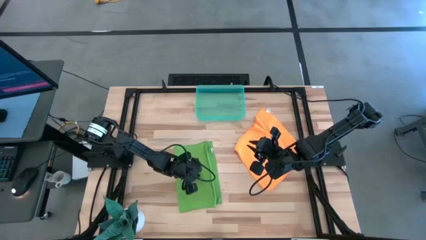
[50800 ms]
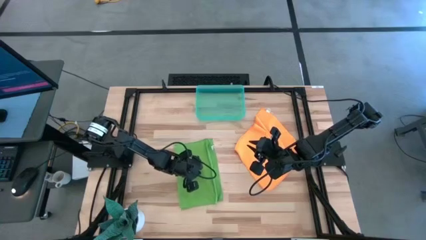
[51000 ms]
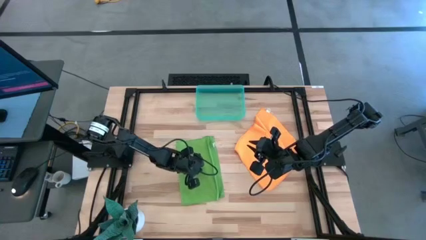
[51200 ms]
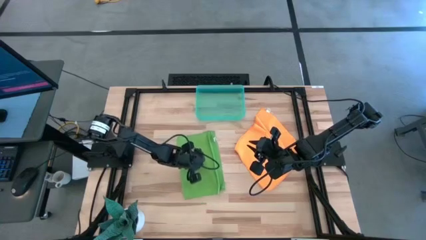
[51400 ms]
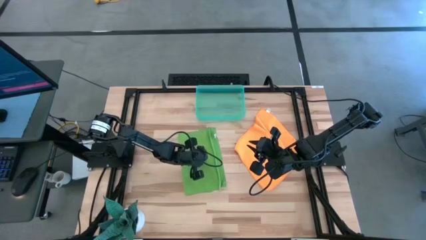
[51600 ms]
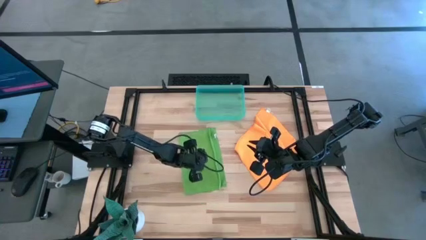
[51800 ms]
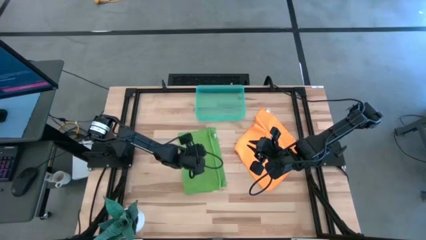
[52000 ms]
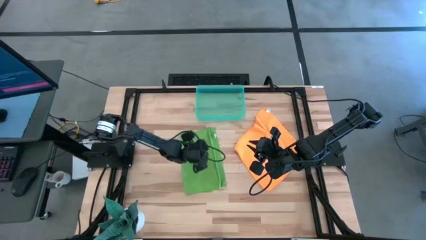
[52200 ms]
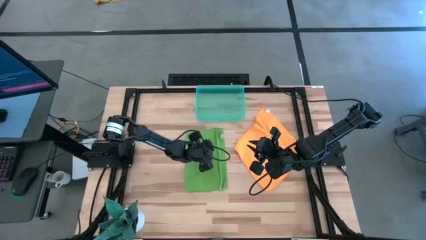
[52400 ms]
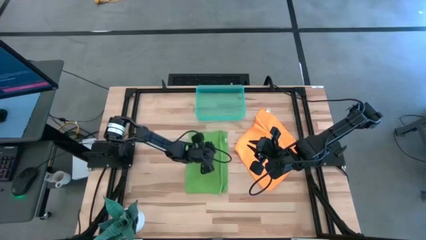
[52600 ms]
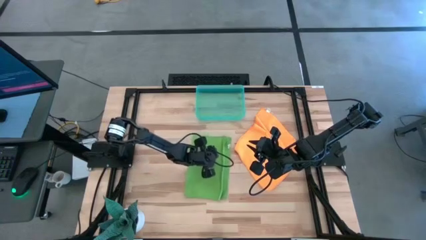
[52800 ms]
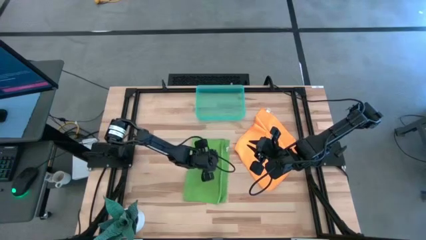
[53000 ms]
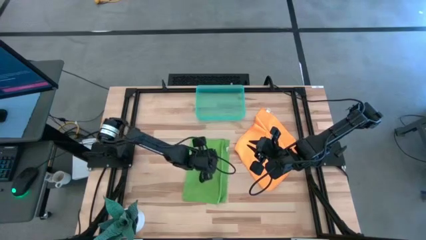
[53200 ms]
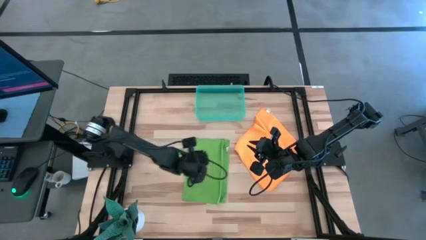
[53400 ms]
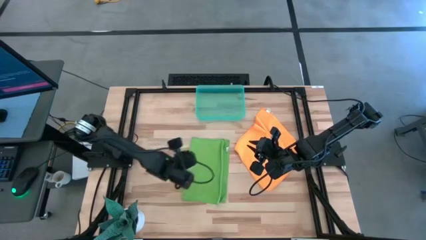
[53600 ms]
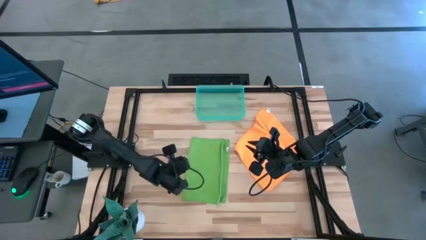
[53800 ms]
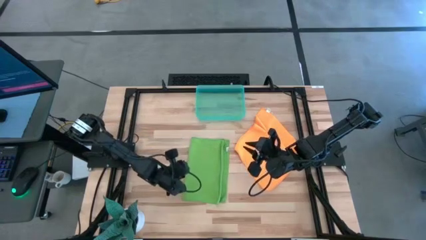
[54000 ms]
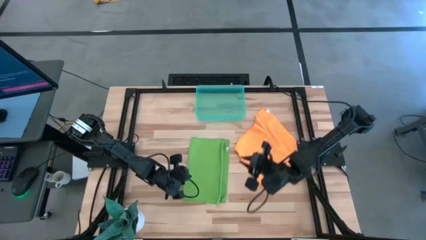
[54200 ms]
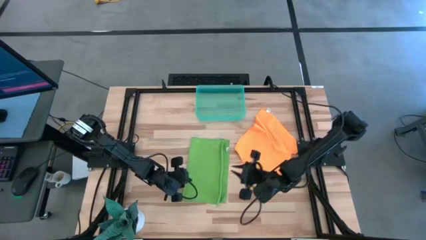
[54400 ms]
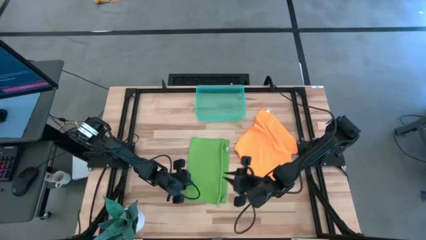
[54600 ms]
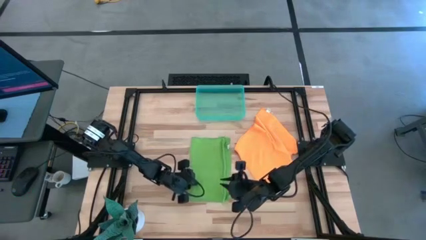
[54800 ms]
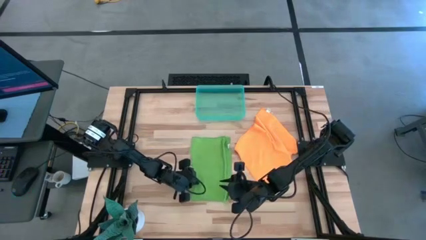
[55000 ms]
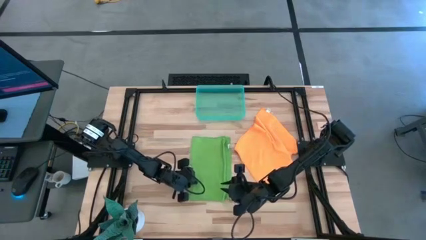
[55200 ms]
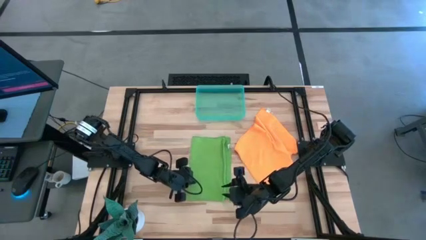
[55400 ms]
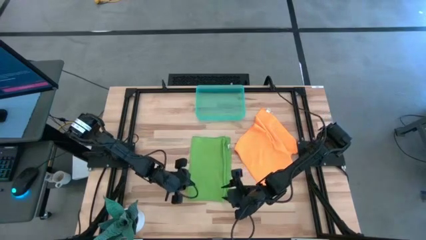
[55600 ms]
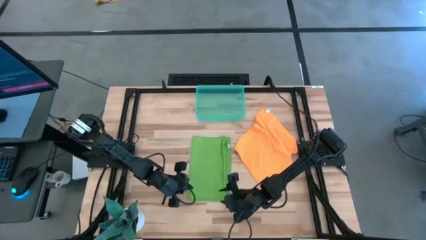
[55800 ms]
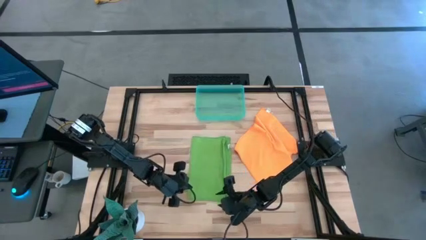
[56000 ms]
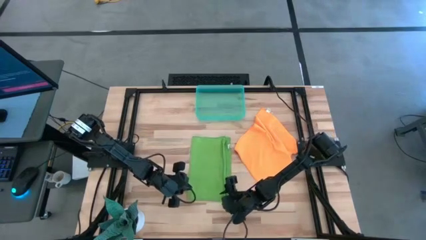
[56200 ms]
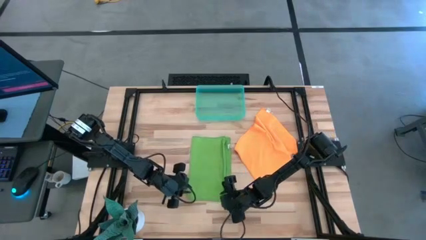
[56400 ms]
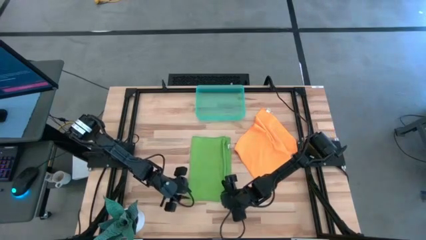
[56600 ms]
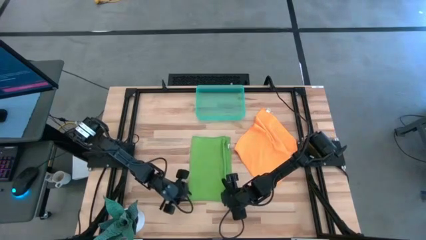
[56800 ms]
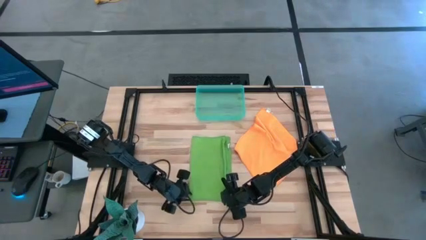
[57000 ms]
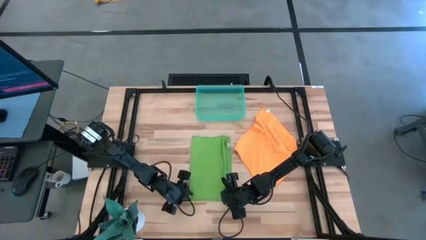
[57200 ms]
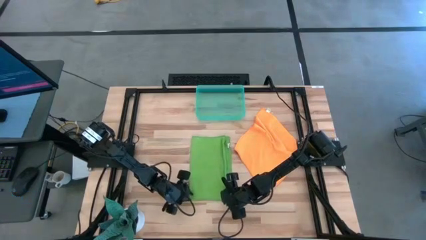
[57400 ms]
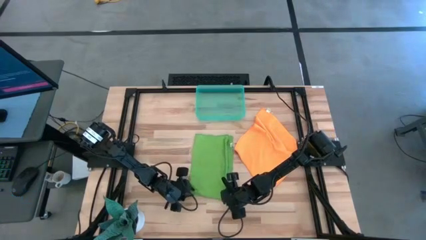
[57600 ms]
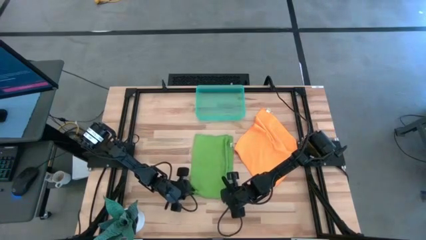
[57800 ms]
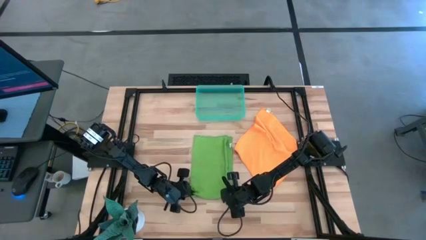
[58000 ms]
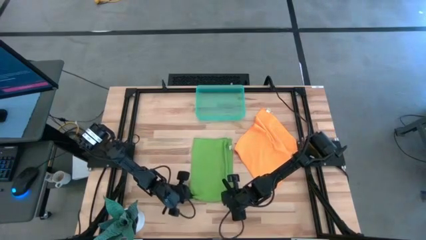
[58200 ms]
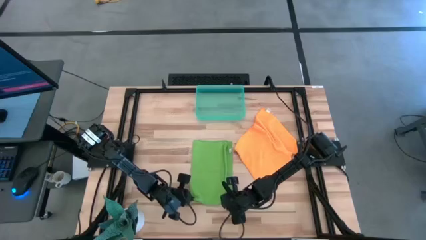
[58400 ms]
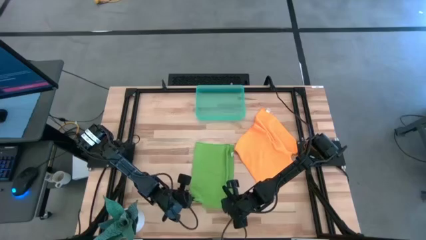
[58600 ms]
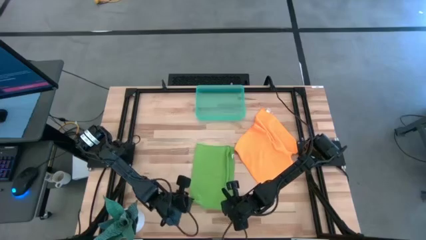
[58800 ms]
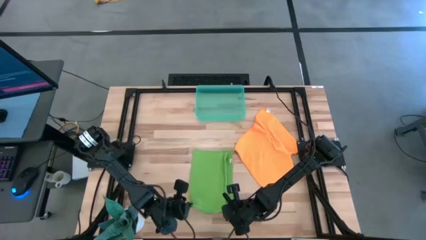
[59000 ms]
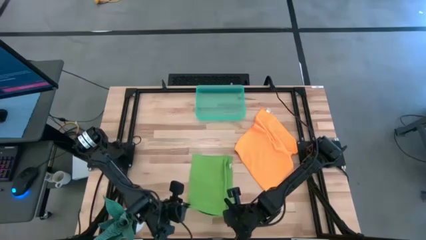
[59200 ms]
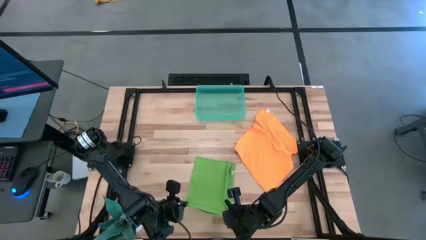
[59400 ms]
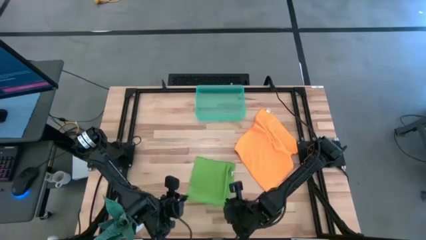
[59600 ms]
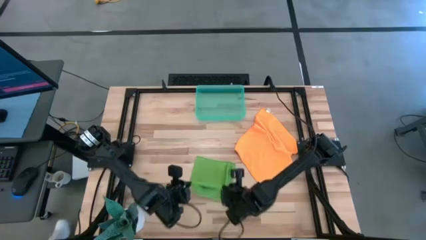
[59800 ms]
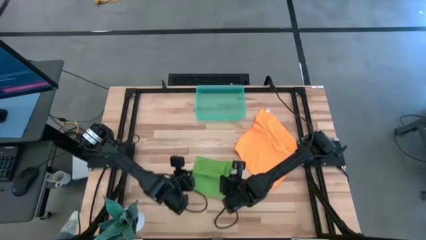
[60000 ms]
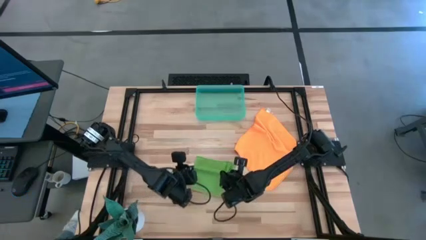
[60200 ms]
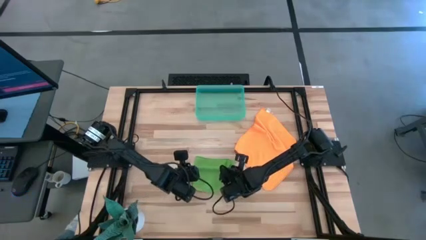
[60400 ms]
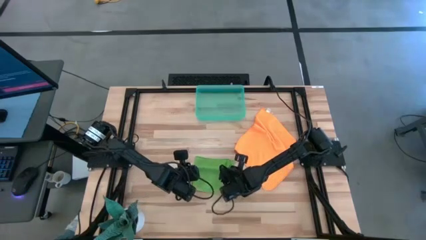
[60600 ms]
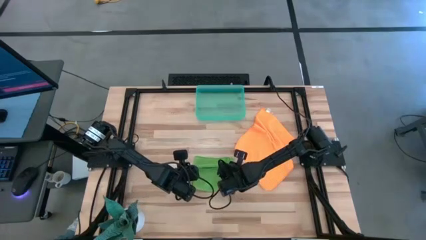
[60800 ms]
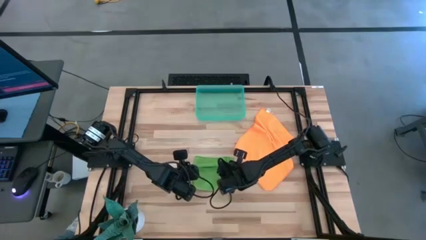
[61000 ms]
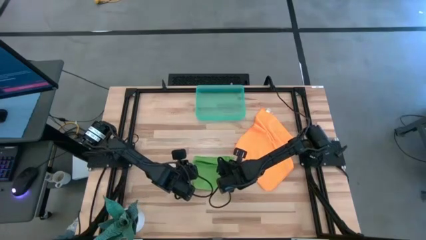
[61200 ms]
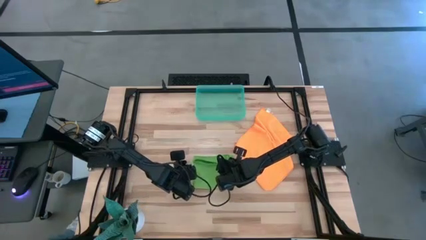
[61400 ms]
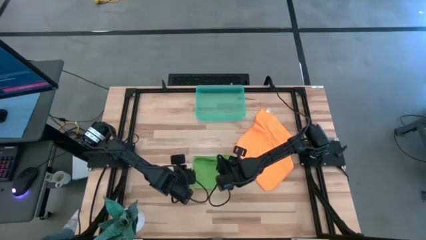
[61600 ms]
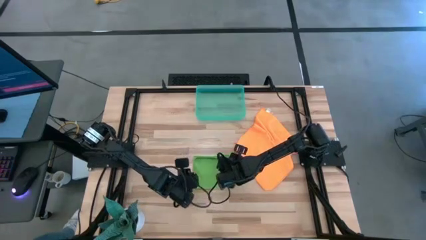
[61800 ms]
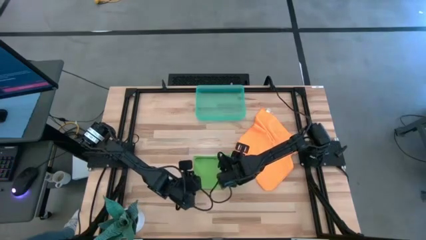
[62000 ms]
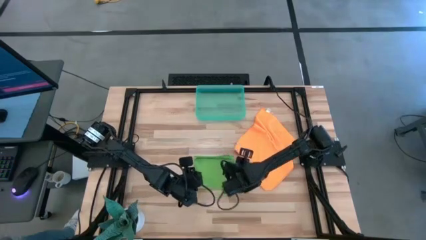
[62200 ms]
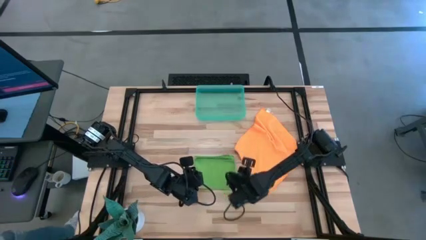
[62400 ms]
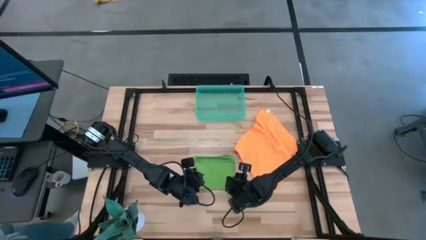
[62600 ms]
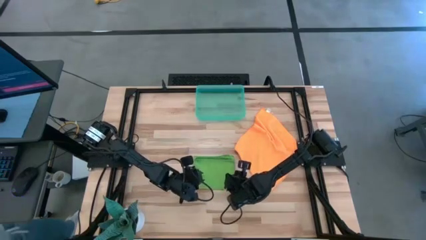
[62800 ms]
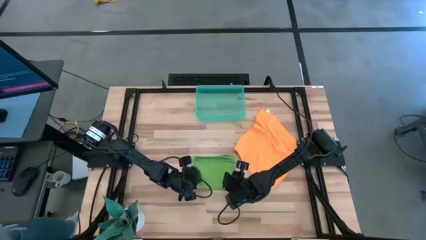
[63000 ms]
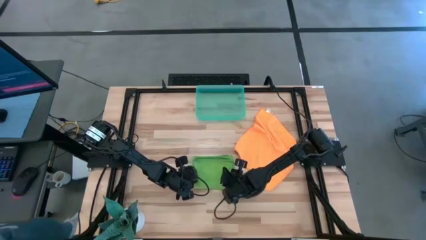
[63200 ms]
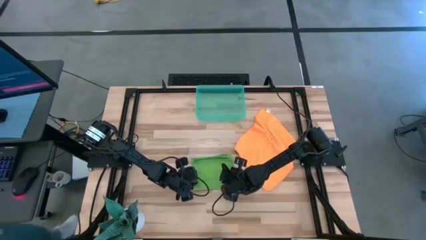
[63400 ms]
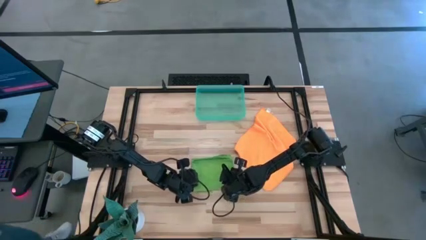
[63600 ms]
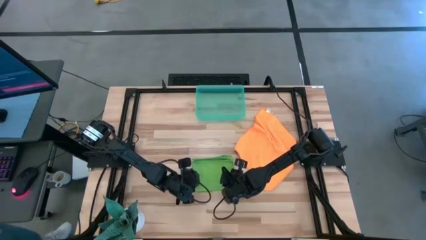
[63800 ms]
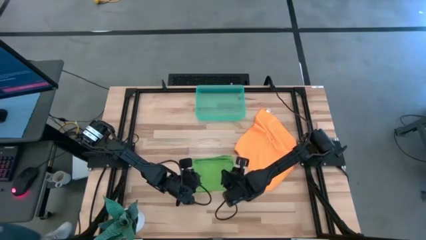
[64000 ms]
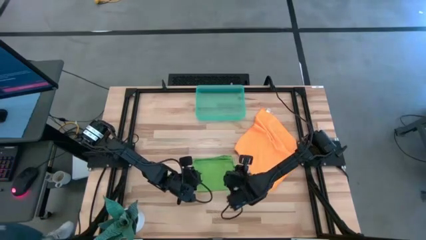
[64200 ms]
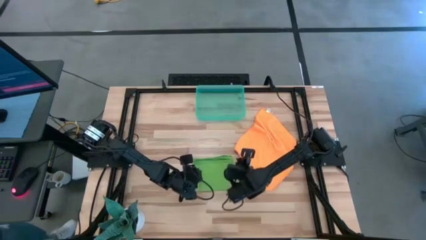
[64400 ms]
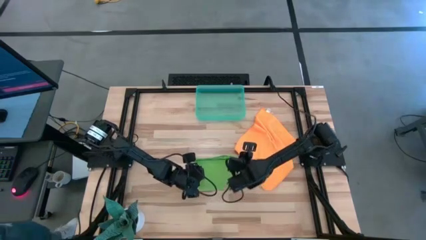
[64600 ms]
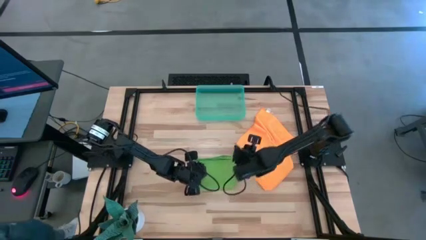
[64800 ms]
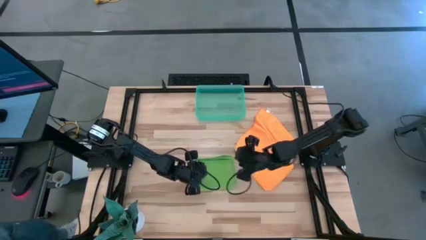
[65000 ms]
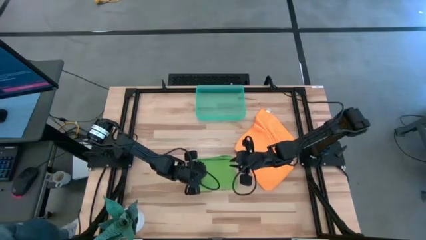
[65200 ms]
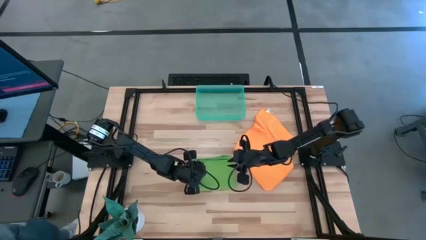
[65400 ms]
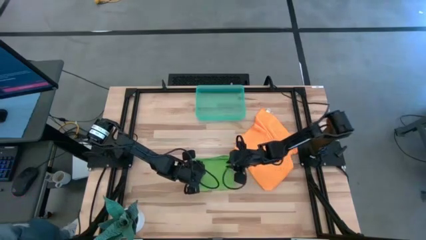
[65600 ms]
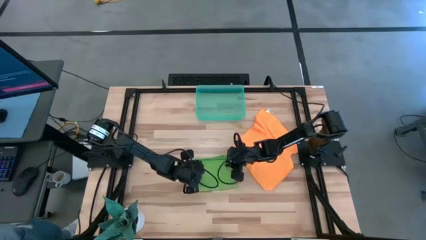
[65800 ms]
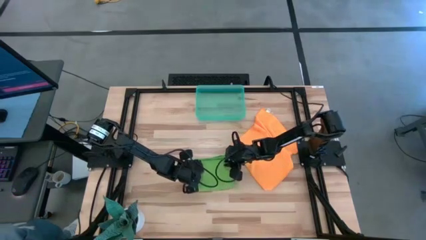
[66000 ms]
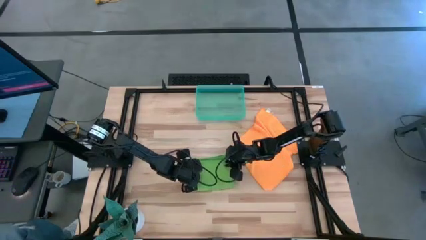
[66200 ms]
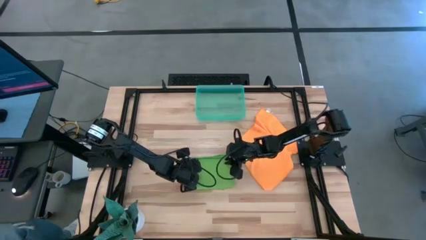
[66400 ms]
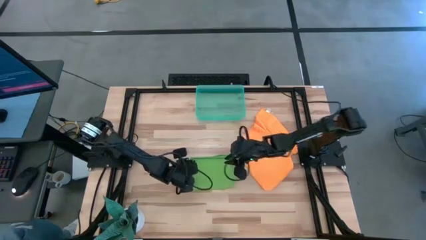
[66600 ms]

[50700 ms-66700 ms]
Task: Roll microfiber towels into tight, uniform cylinder then place into a basket
Fold the green microfiber towel
